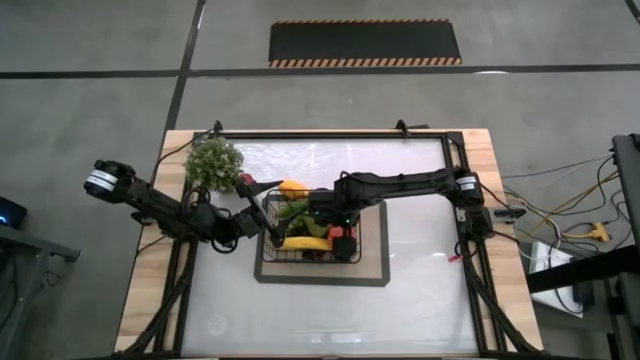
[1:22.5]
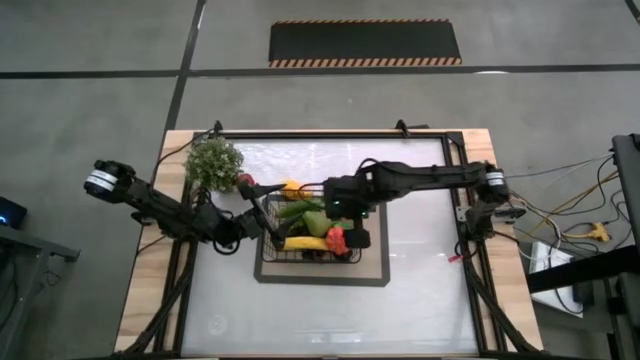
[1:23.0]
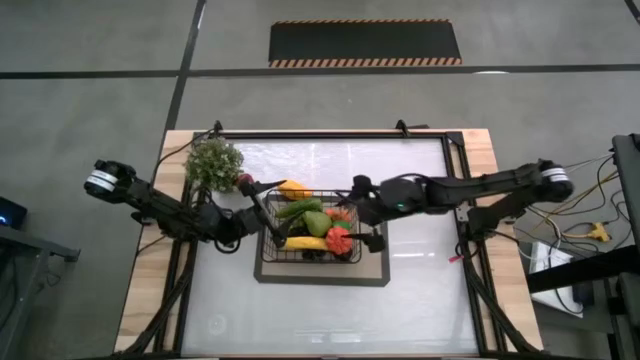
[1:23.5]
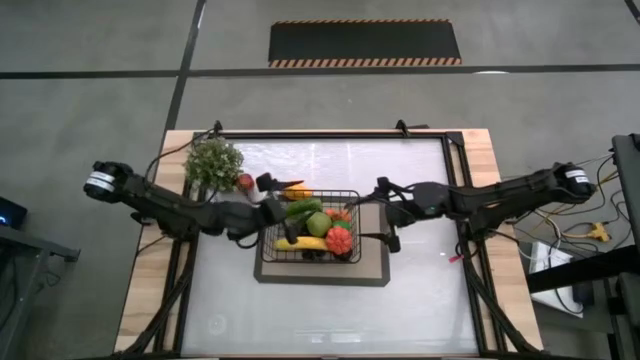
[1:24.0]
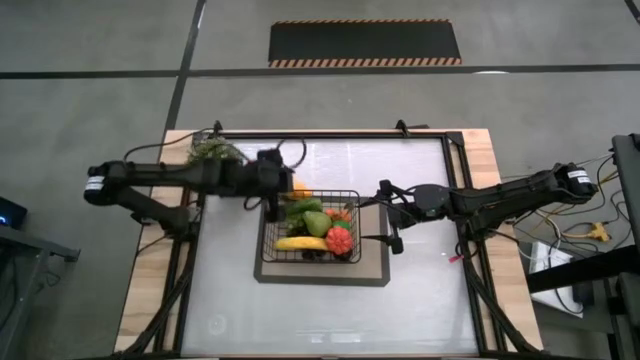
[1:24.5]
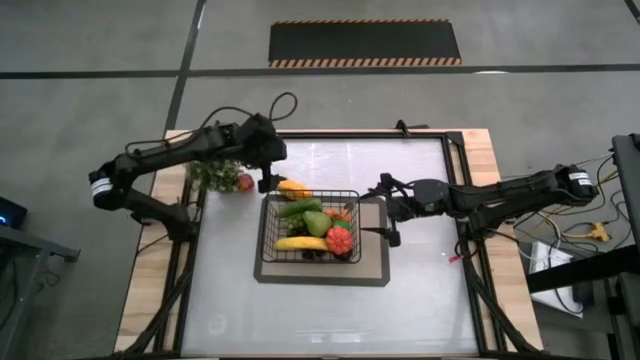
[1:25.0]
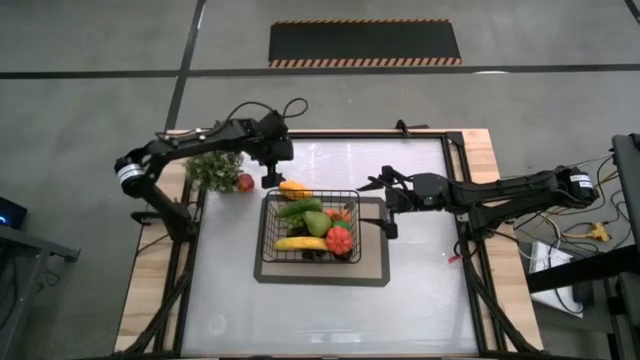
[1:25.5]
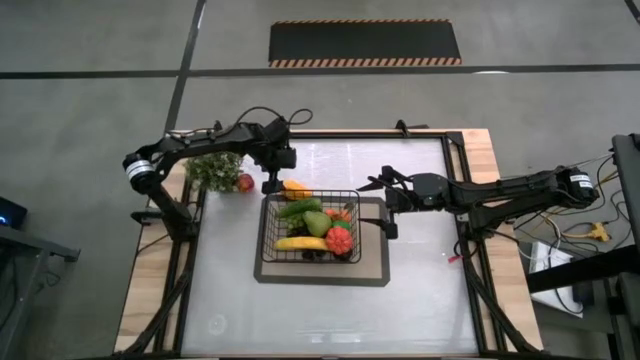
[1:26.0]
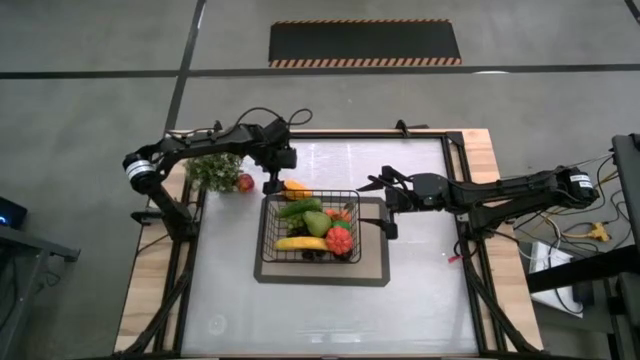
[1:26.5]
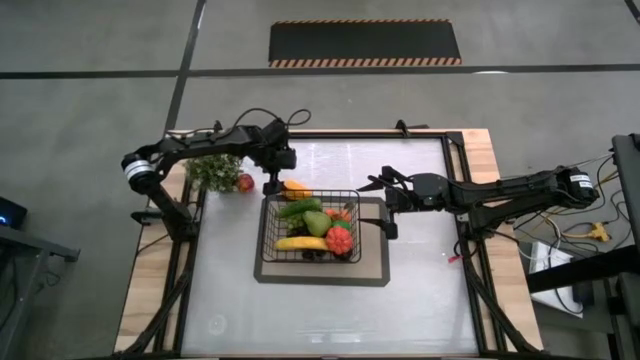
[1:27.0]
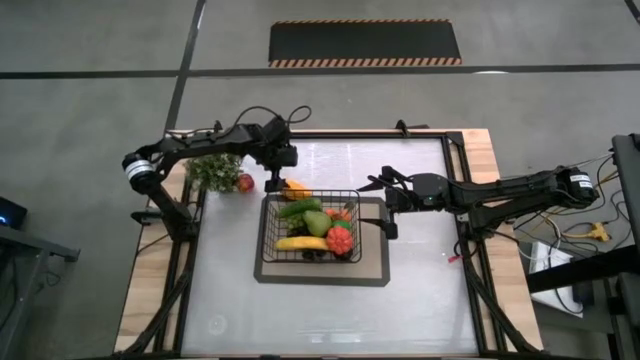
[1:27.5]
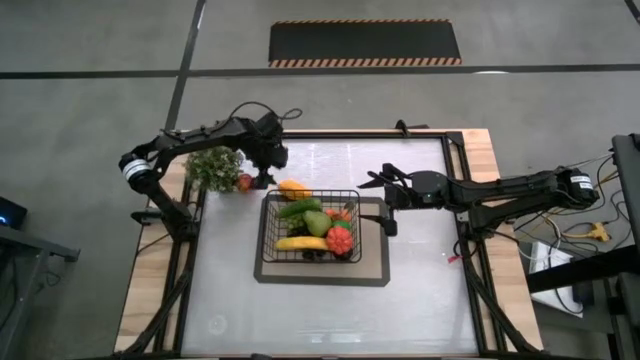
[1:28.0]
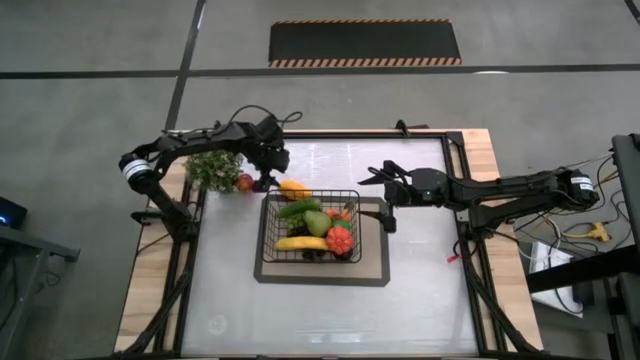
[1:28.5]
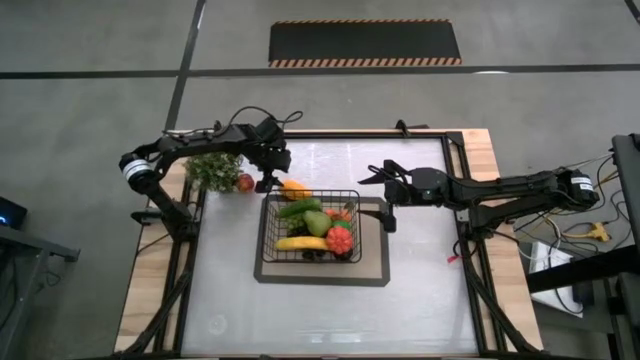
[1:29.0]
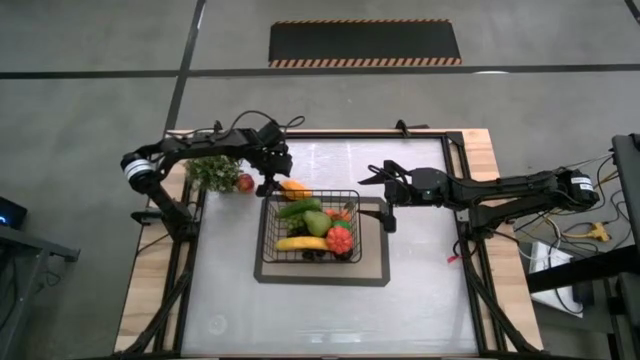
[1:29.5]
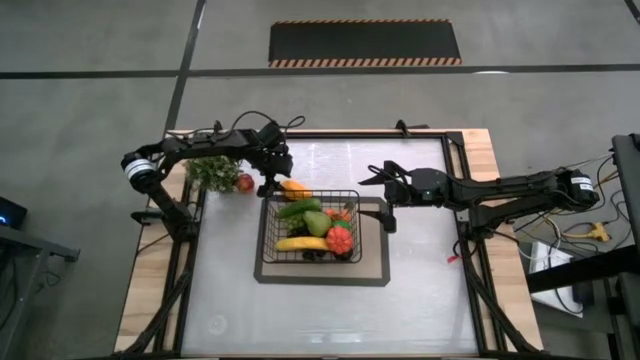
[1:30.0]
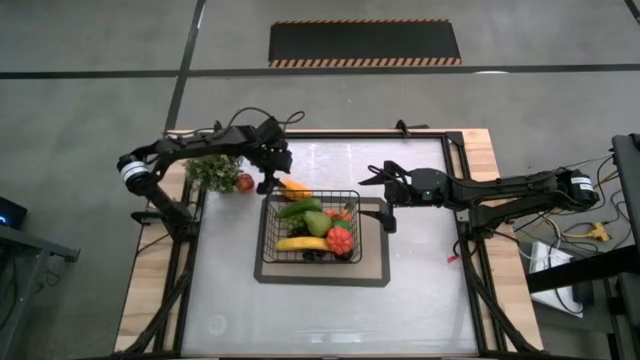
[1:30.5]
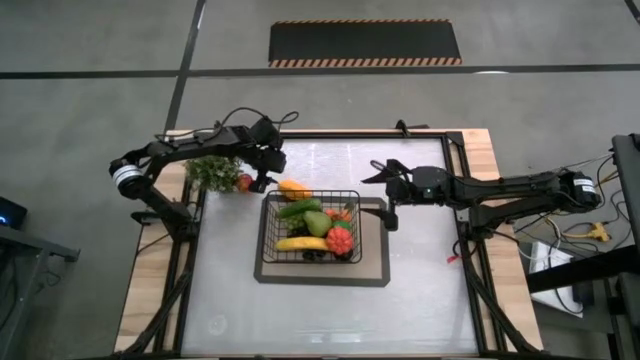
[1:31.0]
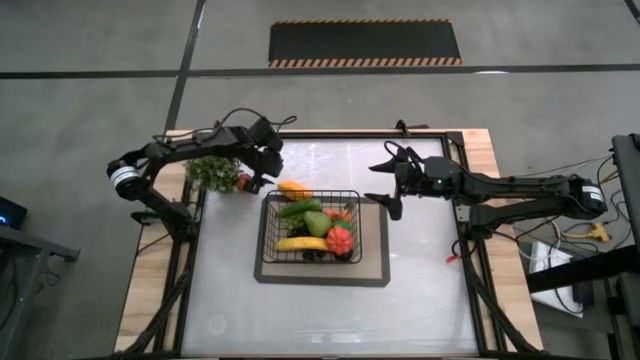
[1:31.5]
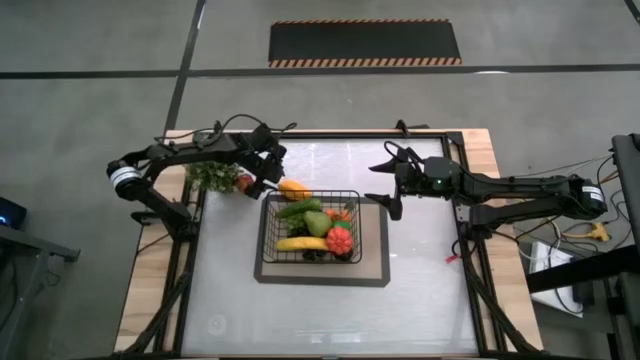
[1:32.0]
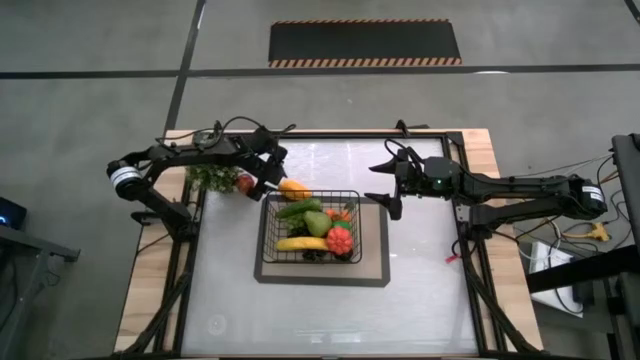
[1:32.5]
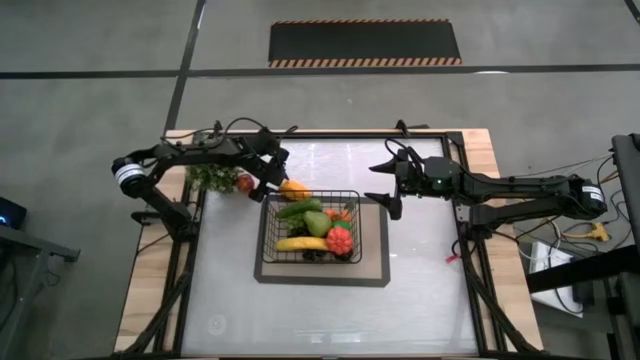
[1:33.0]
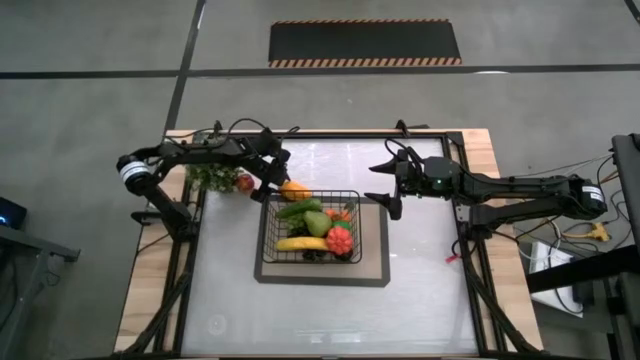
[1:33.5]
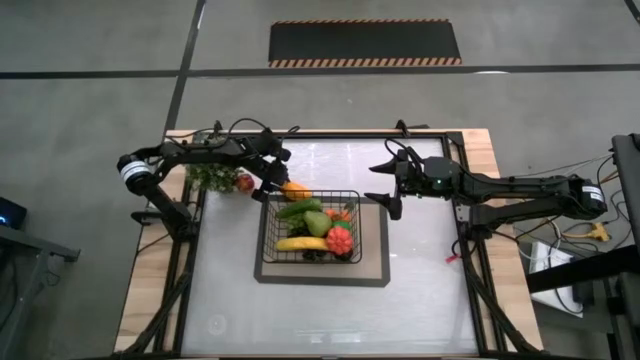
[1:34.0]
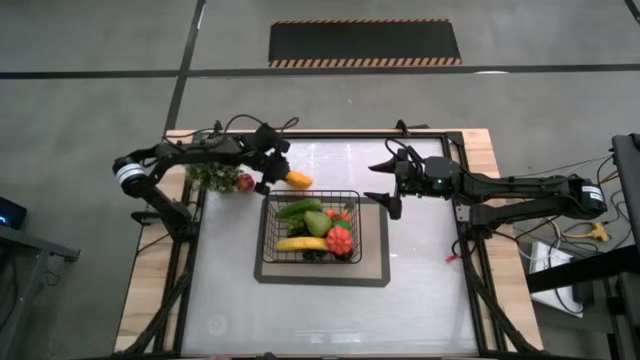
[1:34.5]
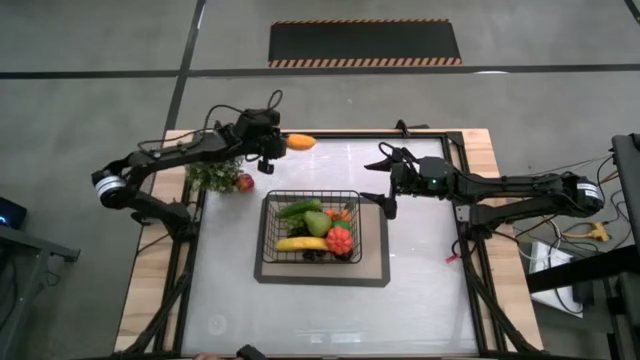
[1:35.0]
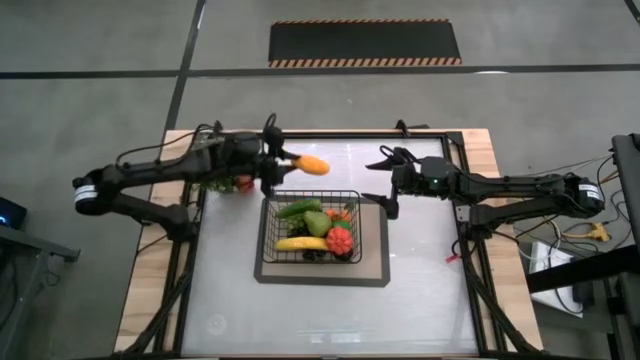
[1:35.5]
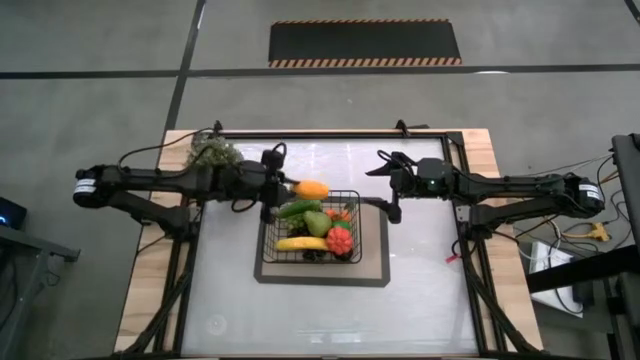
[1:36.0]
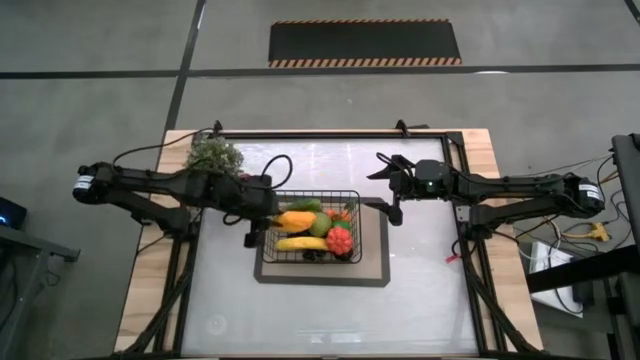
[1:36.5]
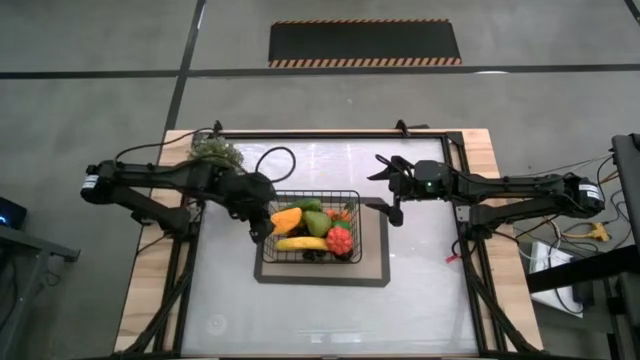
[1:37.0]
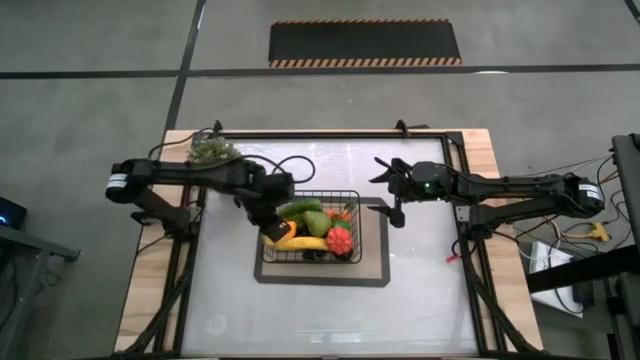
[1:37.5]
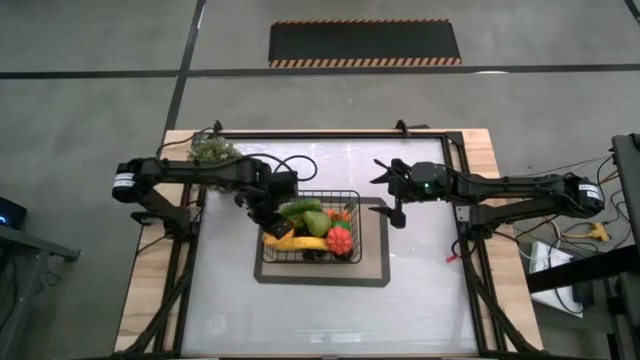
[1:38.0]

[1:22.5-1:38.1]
Task: Build produce basket
Put the yellow mango into the black wire basket

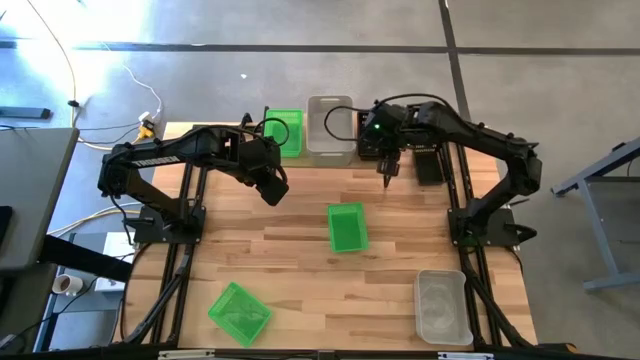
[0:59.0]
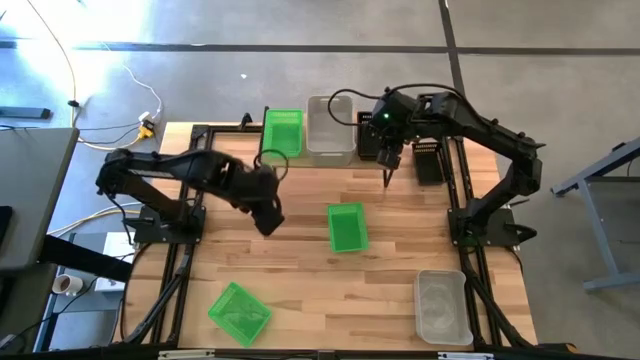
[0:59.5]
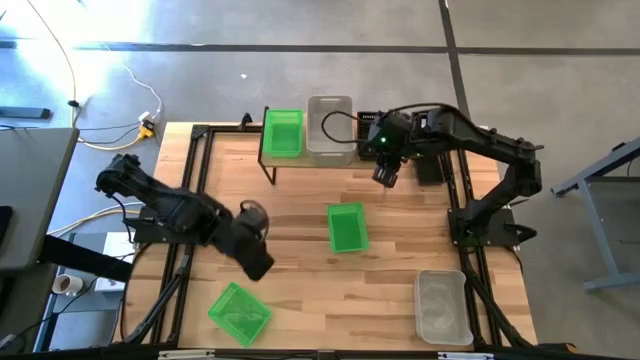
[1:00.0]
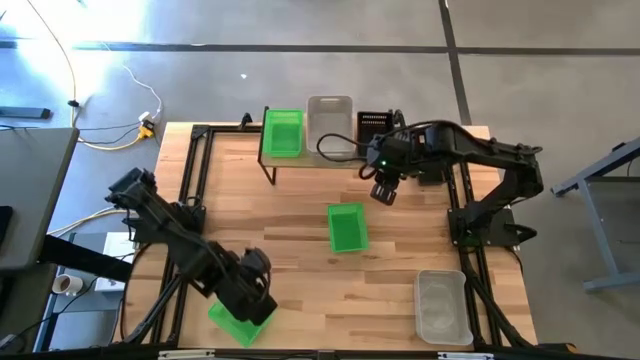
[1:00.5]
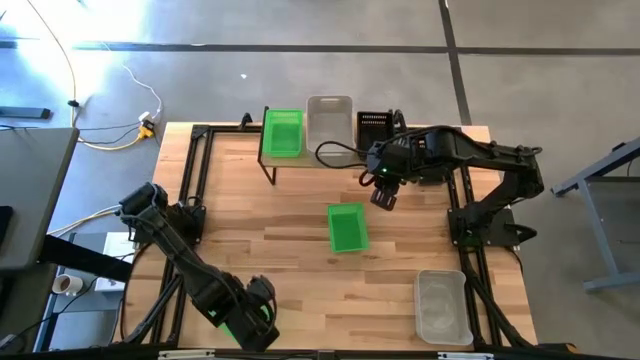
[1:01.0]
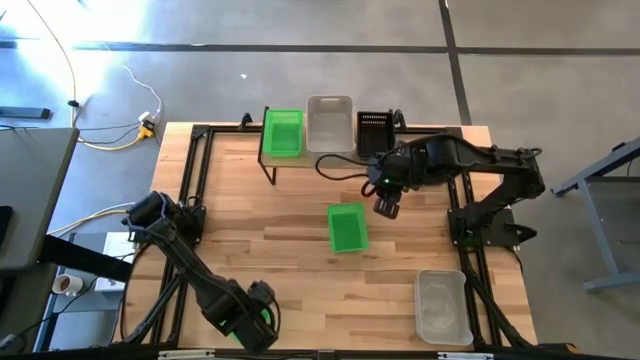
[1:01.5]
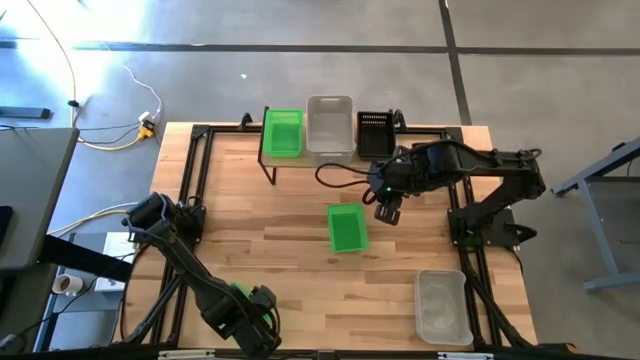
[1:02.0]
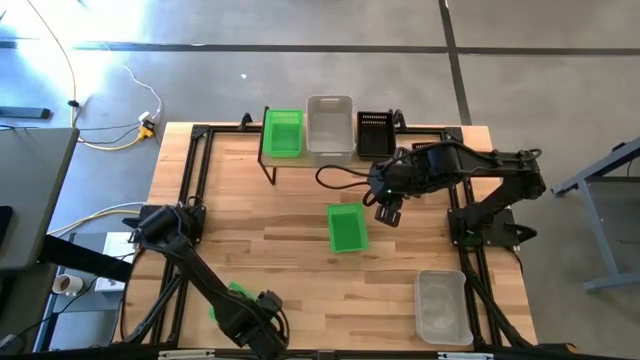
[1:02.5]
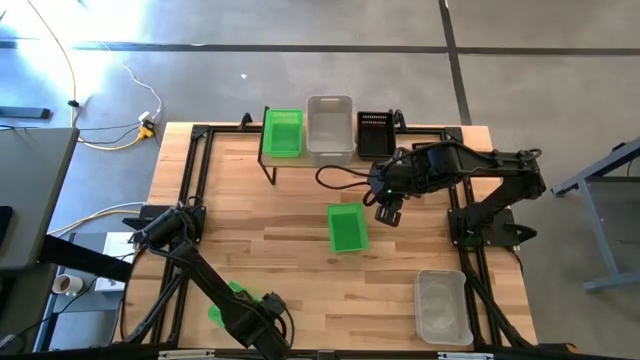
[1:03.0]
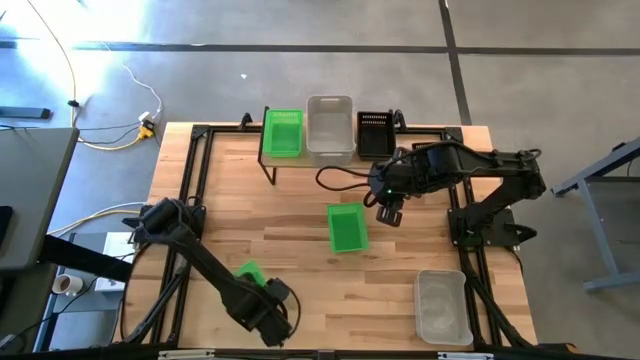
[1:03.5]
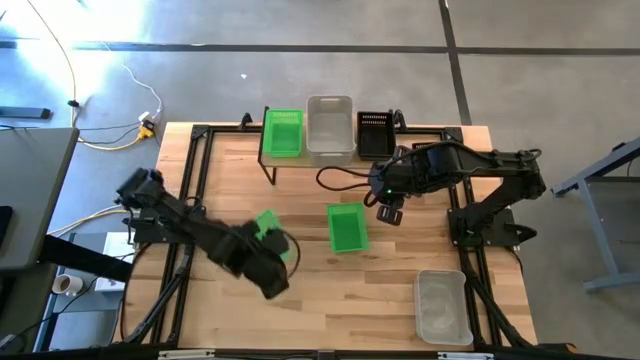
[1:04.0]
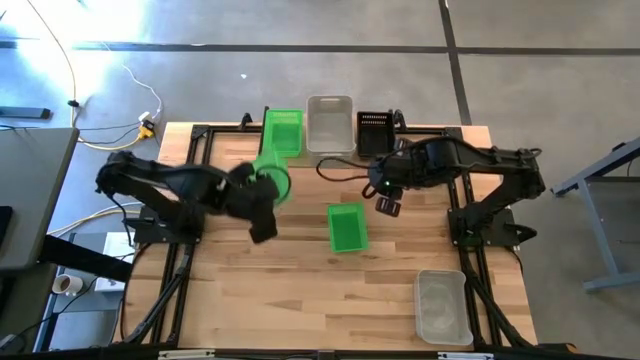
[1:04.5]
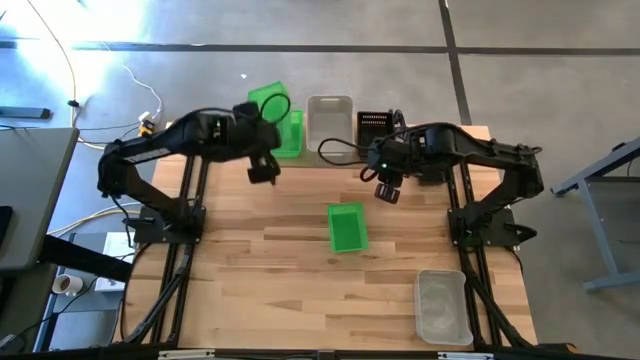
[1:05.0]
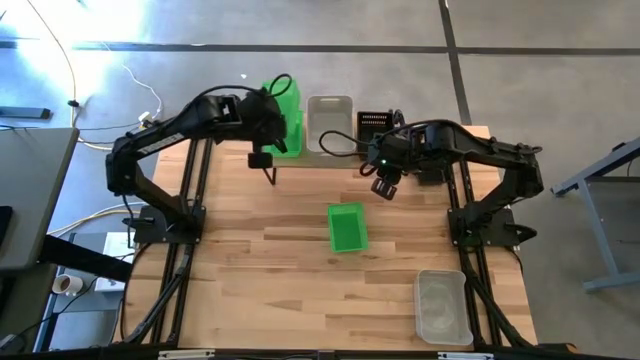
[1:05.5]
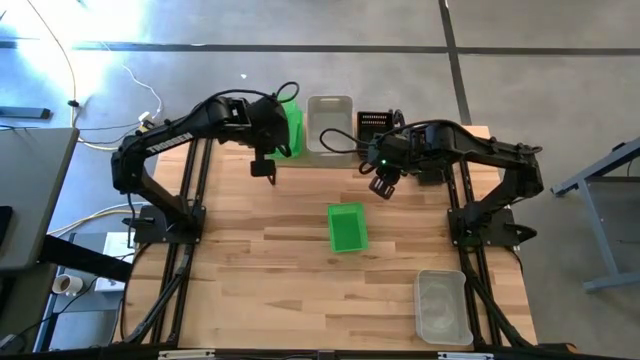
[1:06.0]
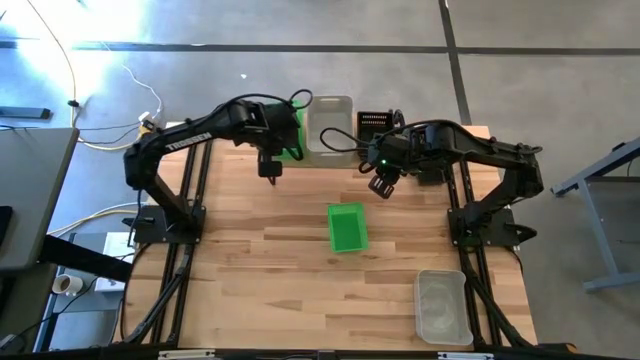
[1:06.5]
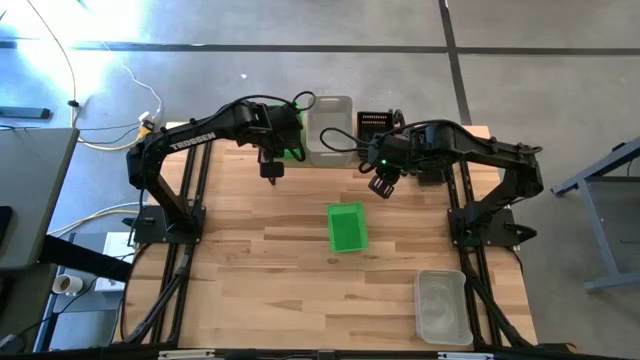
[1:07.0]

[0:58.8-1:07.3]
Task: Stack baskets on shelf by color
Stack the bottom green bin on the green bin on the shelf
